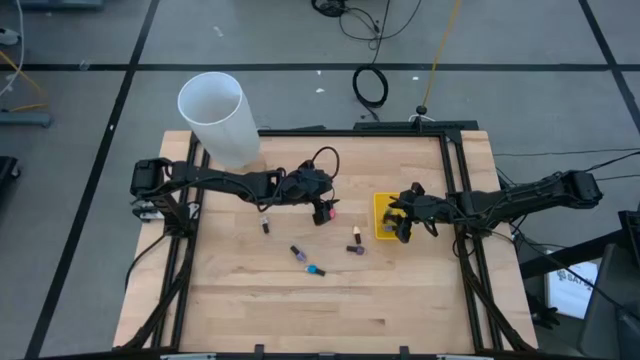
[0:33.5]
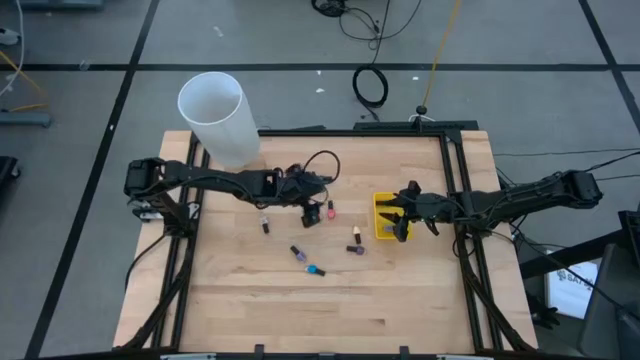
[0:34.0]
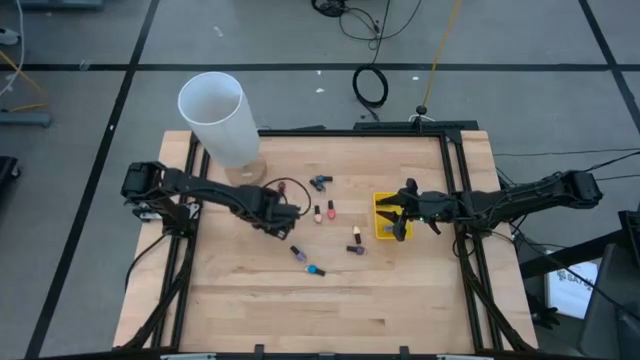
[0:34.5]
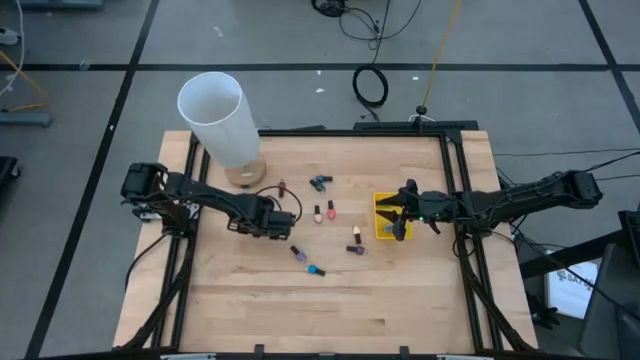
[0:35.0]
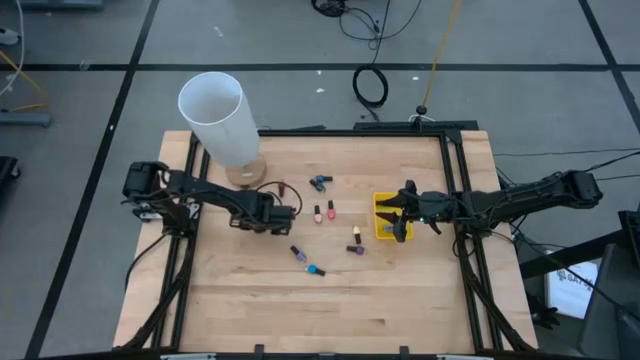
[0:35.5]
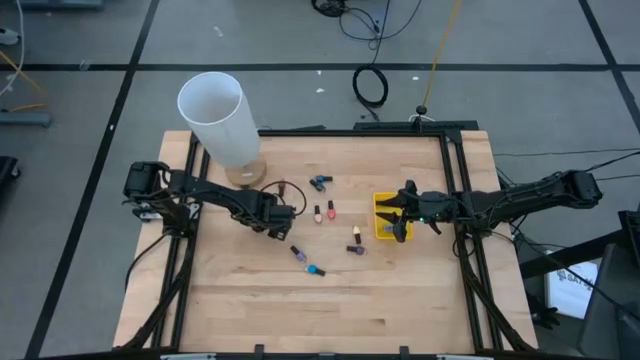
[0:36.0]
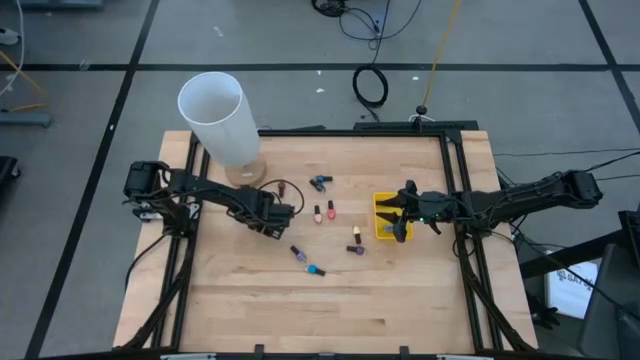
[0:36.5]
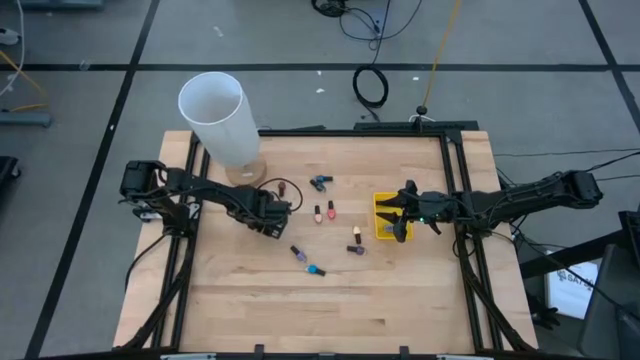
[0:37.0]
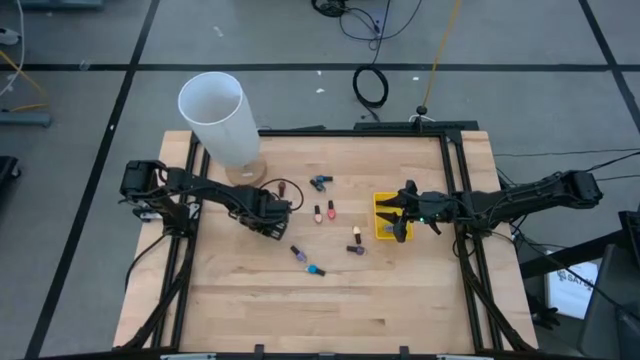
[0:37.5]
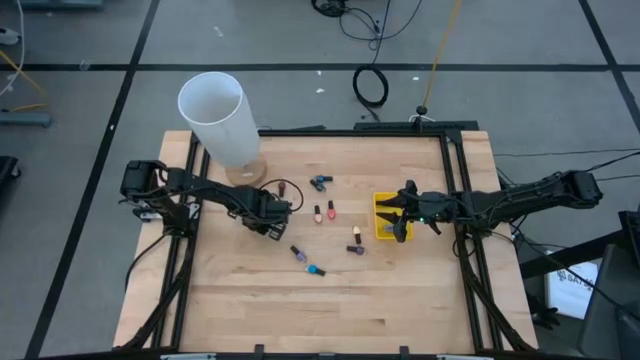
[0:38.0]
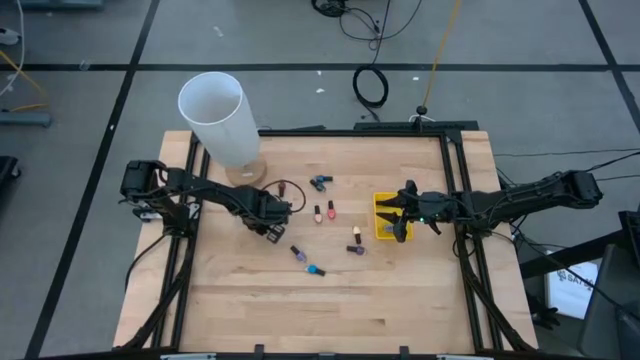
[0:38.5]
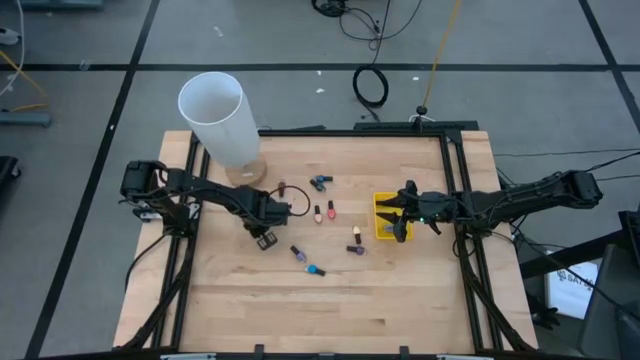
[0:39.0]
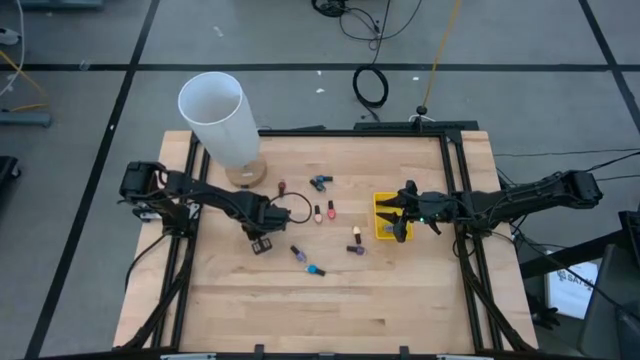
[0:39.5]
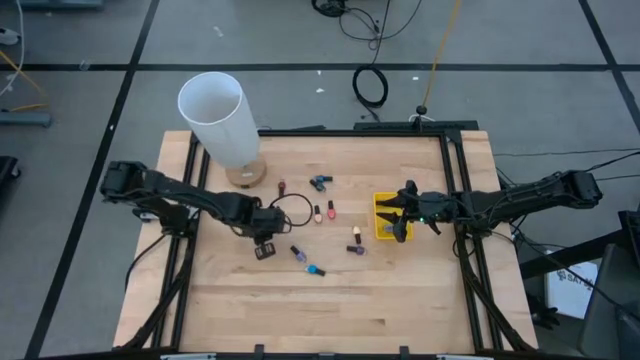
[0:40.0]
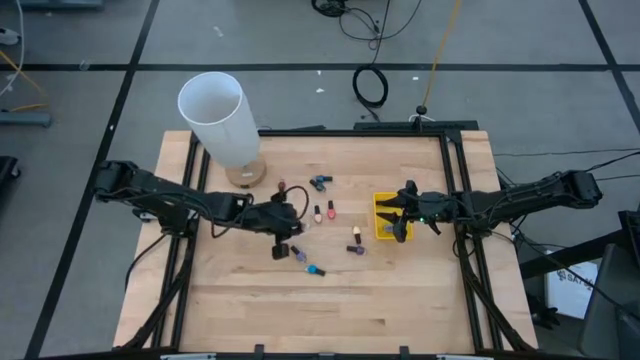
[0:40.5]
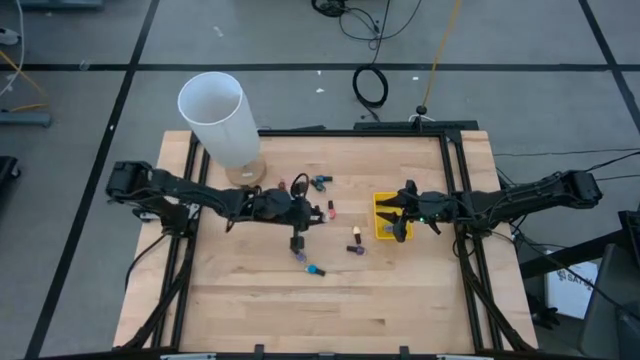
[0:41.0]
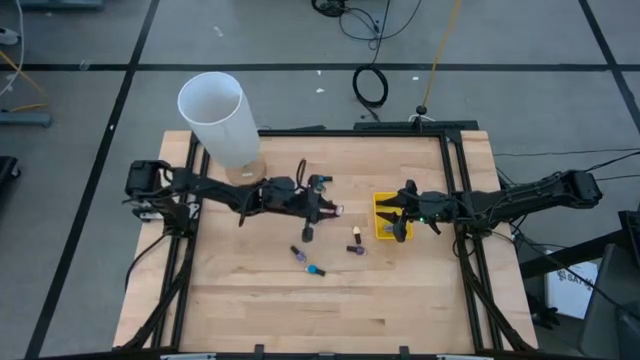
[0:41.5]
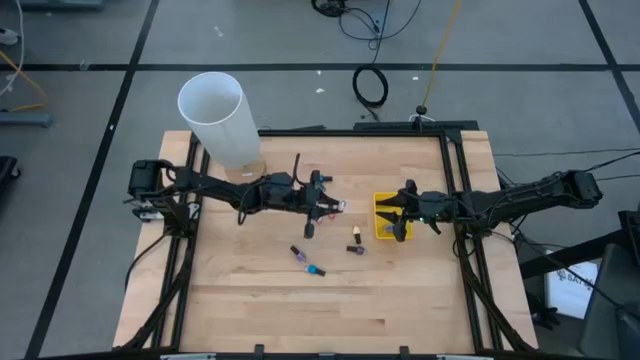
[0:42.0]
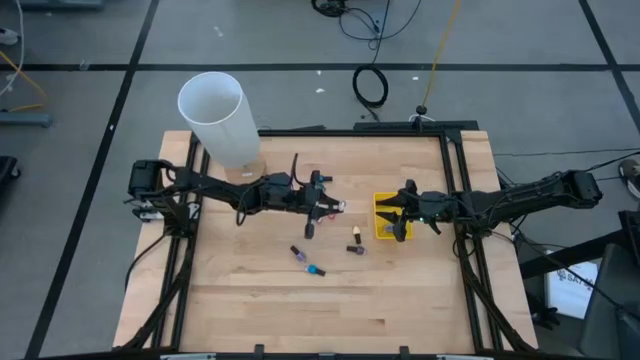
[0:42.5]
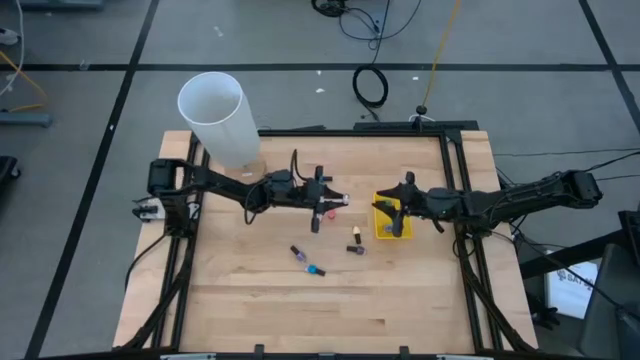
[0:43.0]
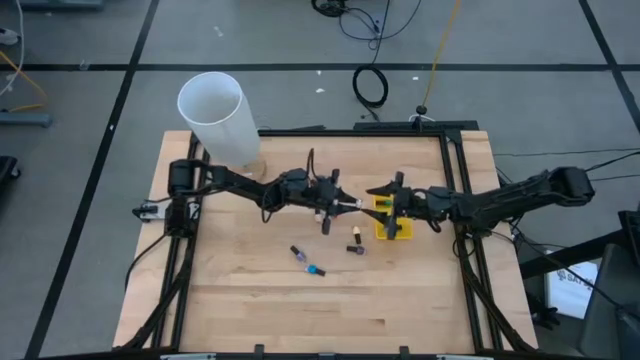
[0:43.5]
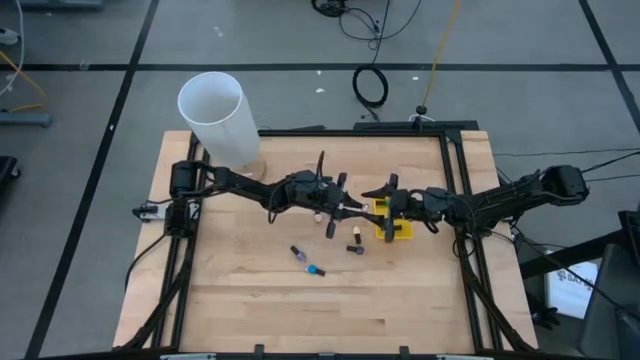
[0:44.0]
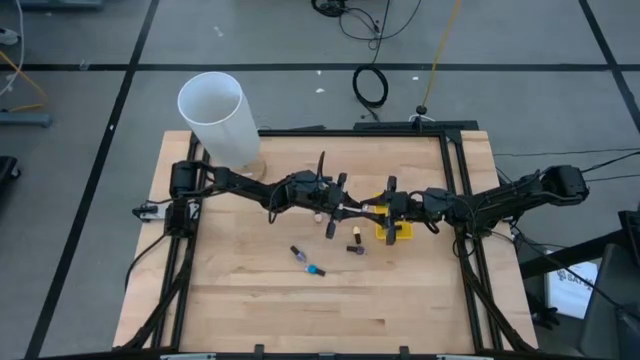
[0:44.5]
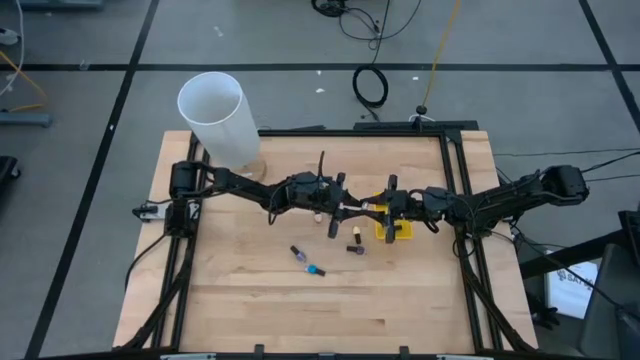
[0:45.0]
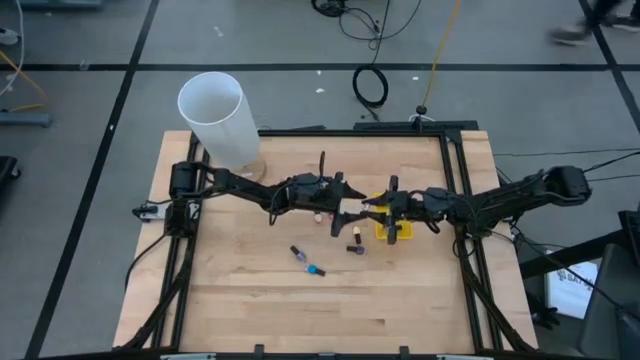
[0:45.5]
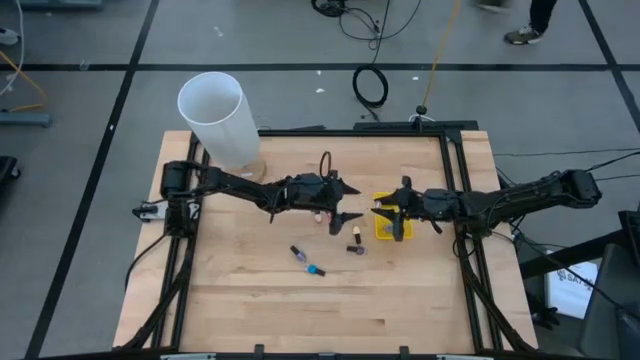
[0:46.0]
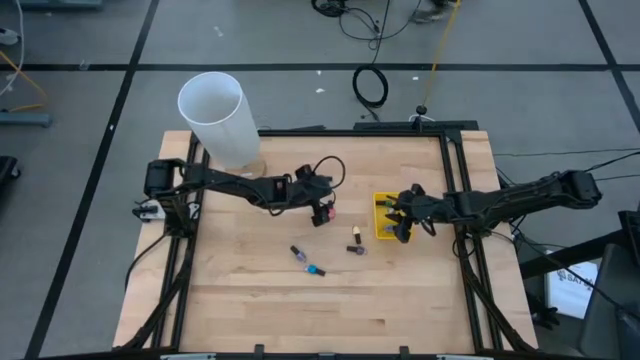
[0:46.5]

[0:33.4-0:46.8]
Task: Pick & Place Nail Polish
Put the white nail polish into the yellow bin

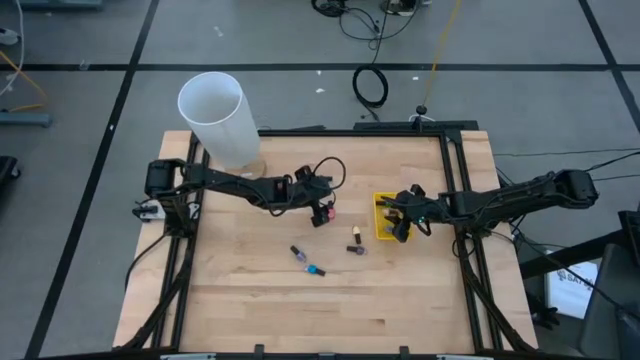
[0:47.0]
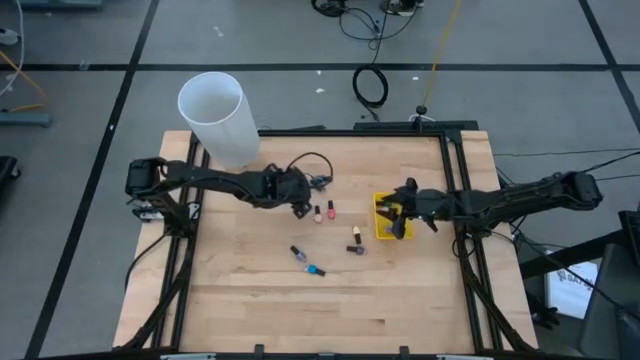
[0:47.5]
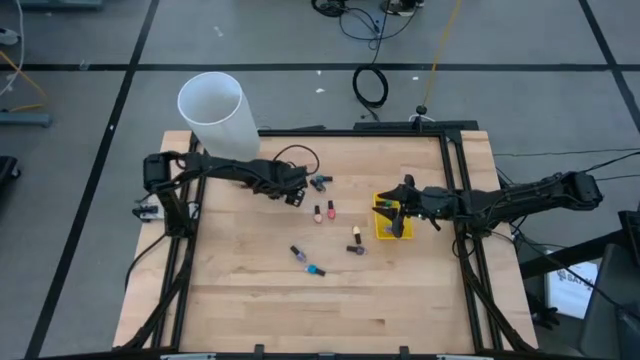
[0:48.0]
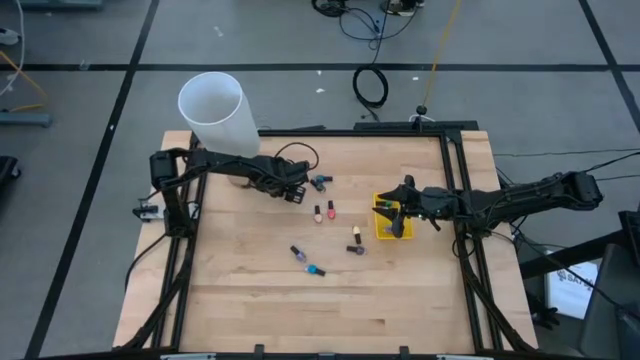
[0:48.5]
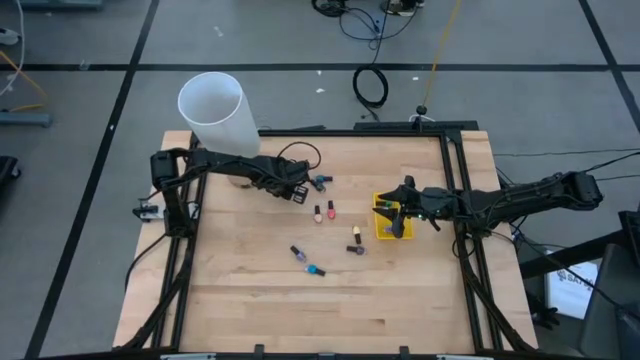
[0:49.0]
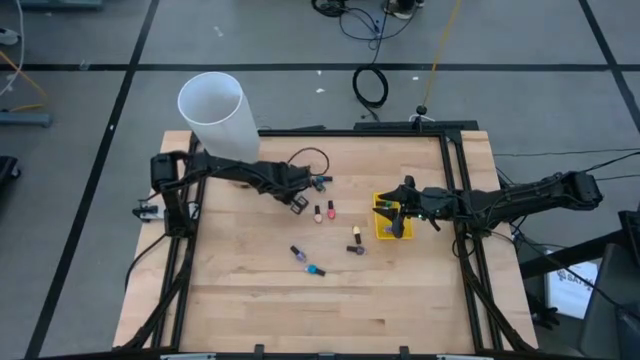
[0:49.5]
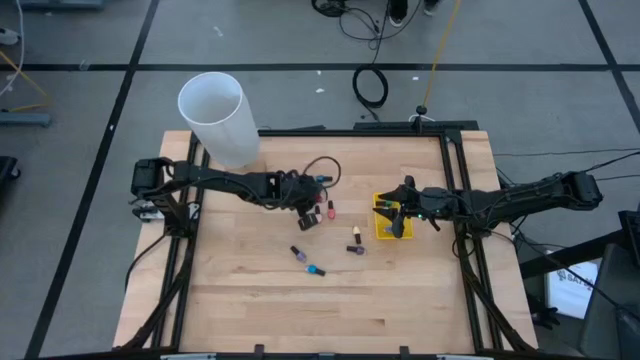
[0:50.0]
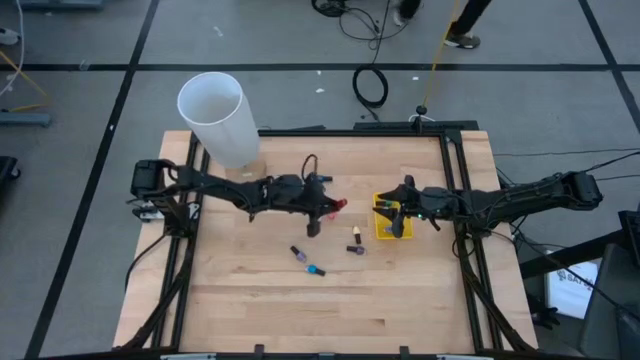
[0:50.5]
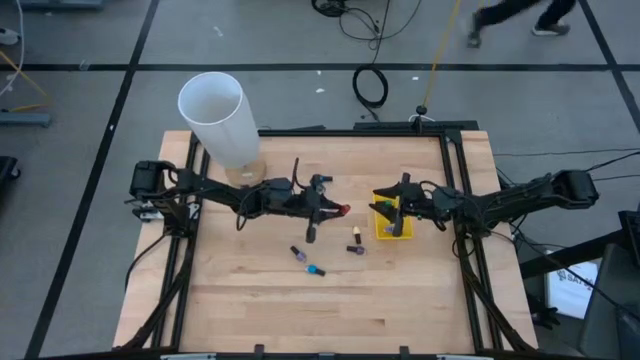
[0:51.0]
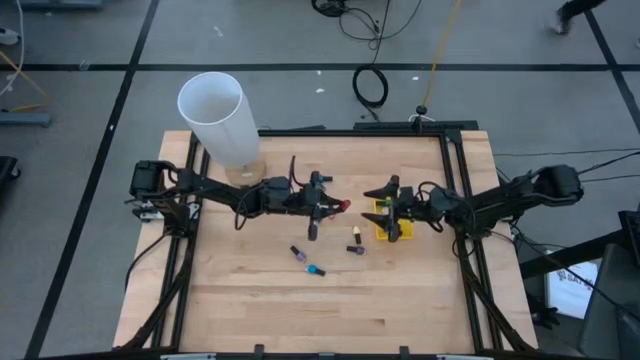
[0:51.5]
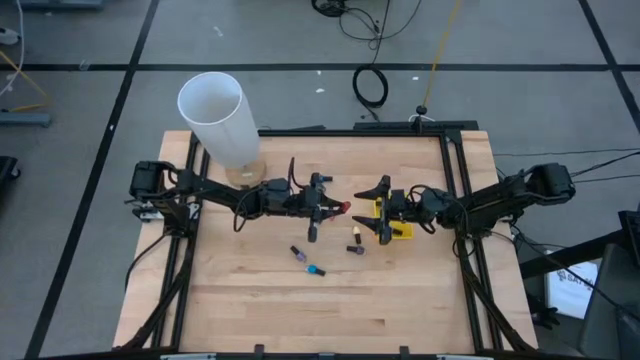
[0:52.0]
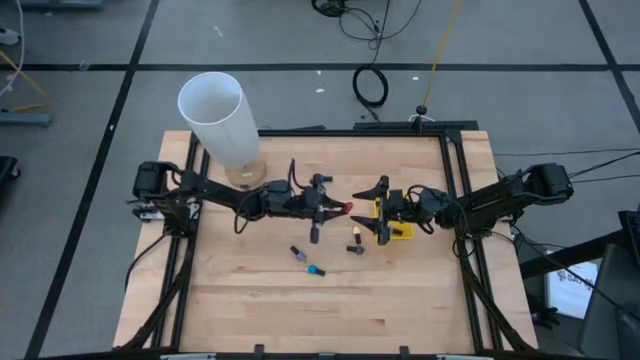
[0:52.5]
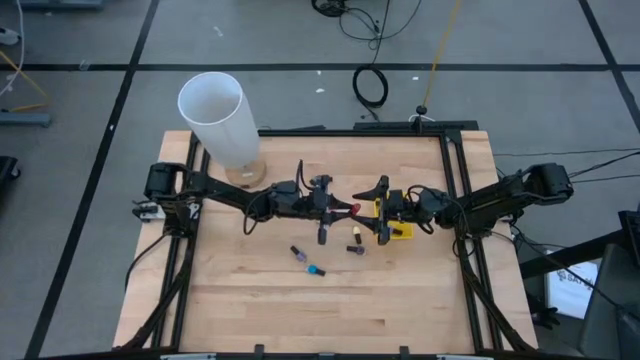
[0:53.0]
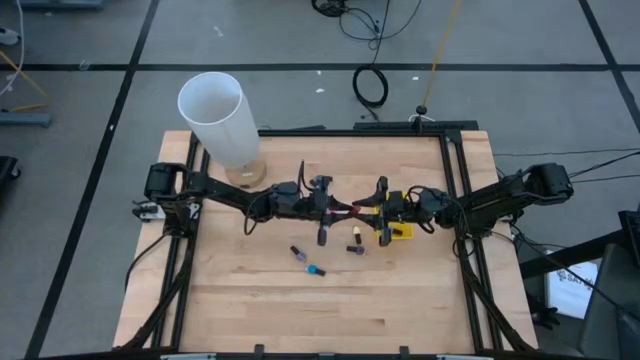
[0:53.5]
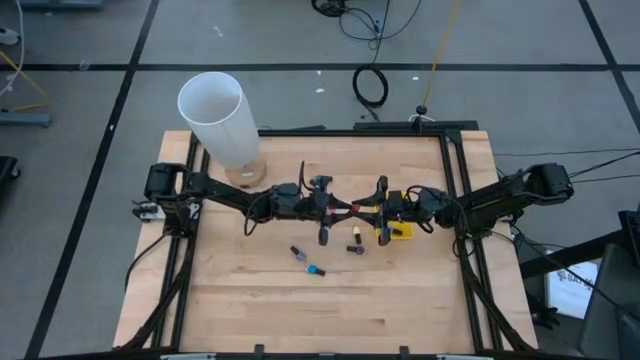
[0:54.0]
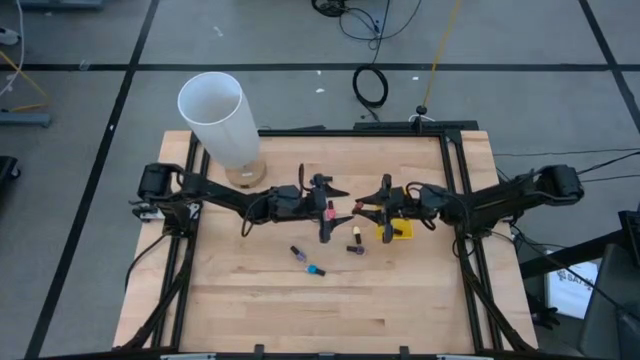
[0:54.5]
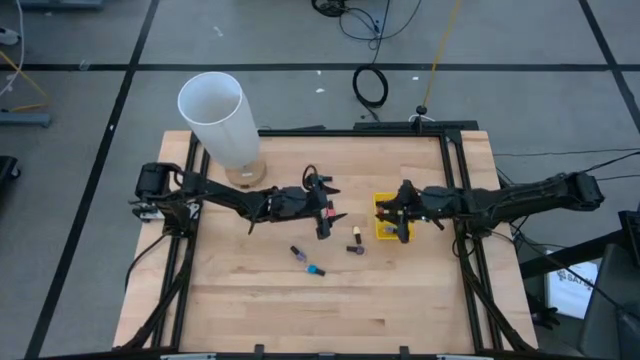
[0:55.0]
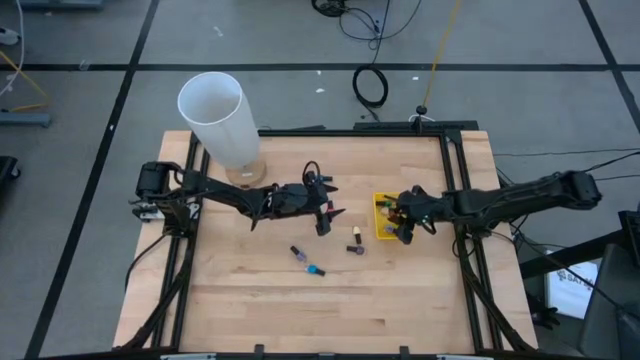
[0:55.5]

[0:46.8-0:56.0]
Put the red nail polish into the yellow bin
